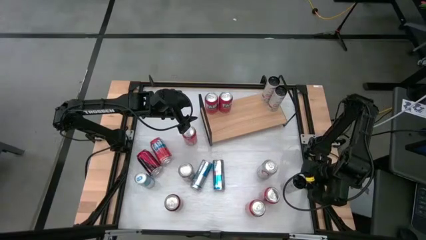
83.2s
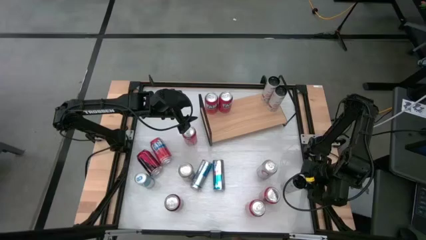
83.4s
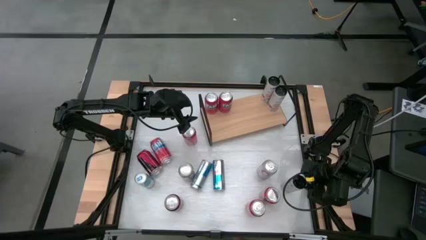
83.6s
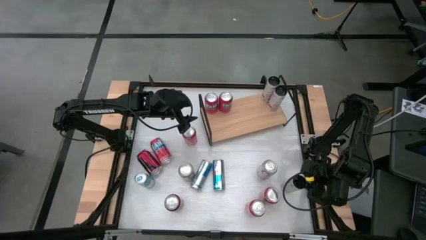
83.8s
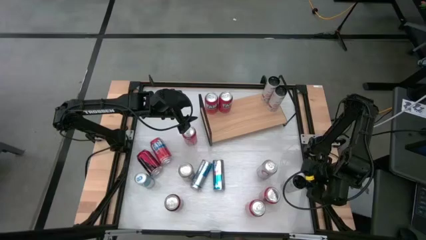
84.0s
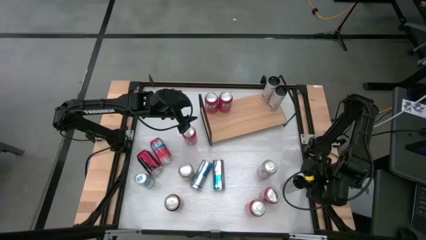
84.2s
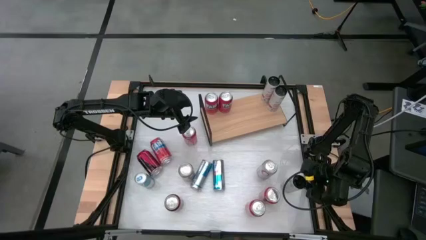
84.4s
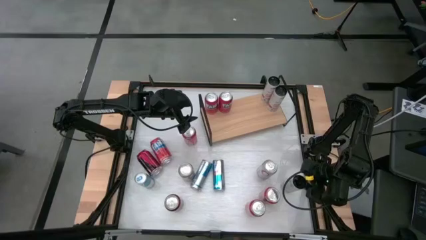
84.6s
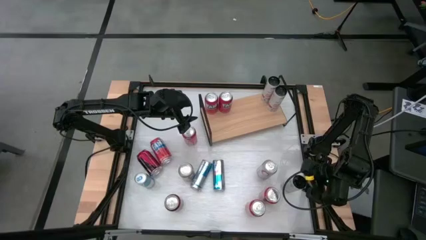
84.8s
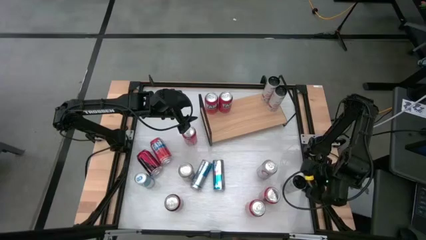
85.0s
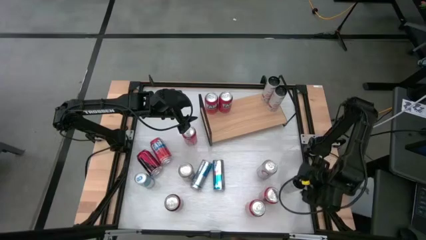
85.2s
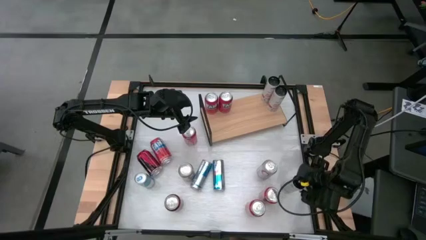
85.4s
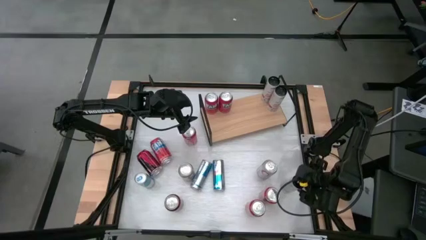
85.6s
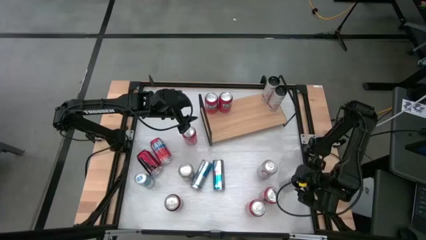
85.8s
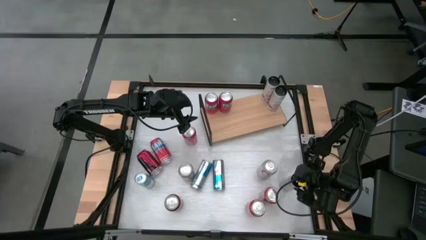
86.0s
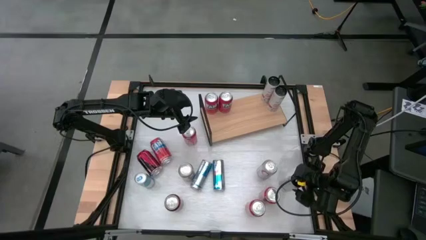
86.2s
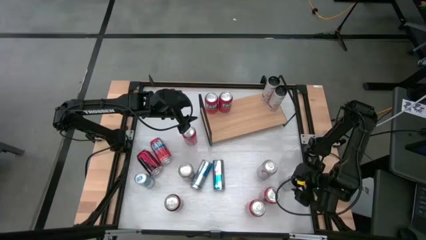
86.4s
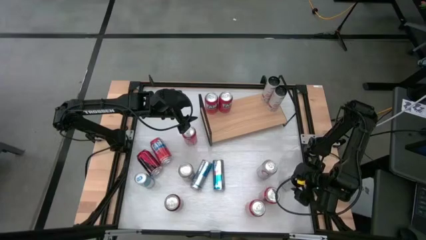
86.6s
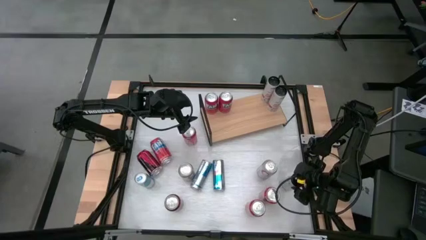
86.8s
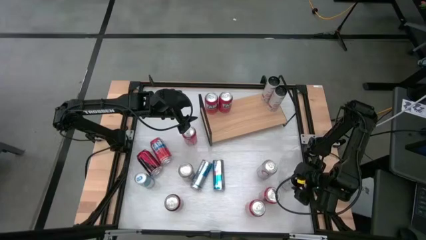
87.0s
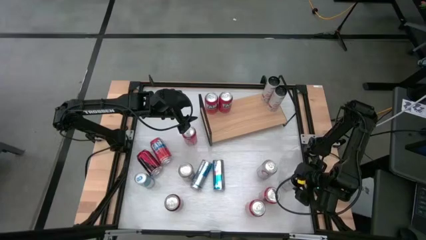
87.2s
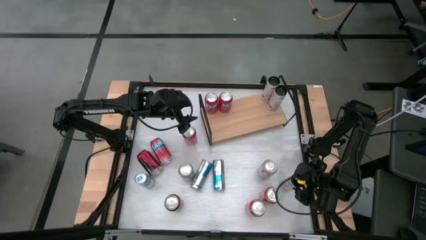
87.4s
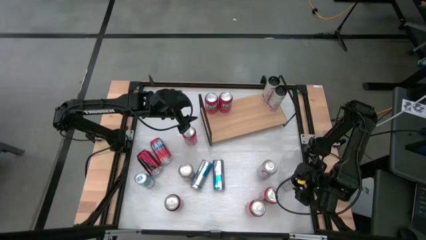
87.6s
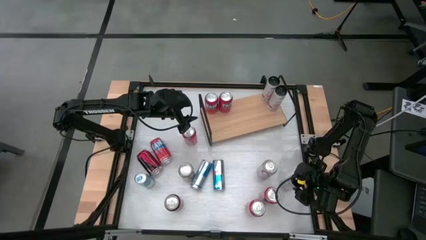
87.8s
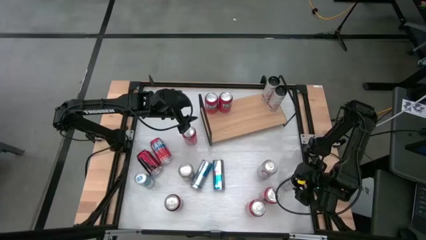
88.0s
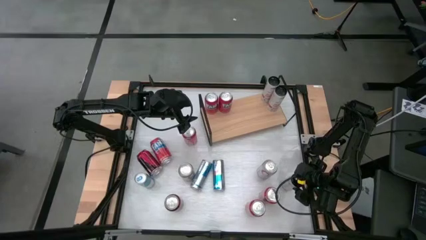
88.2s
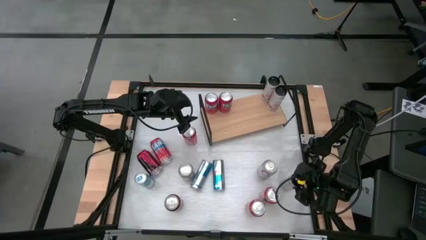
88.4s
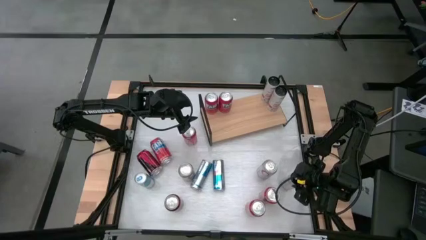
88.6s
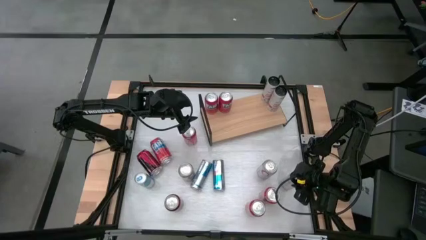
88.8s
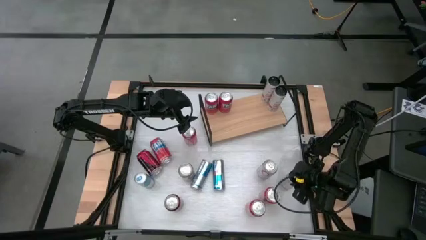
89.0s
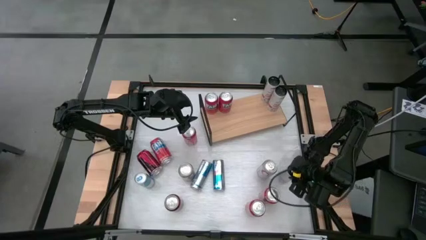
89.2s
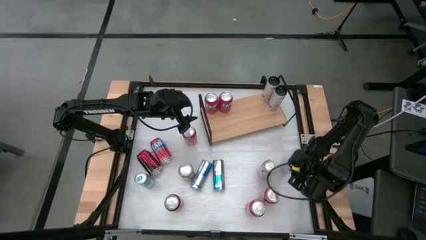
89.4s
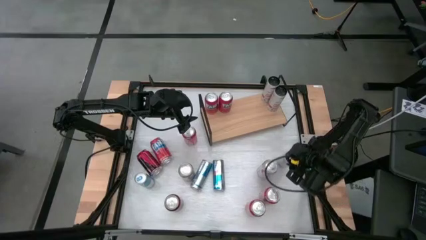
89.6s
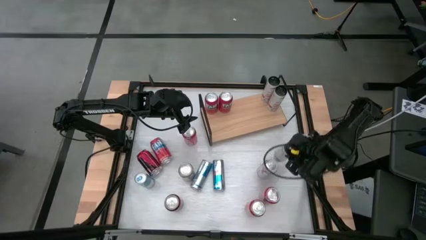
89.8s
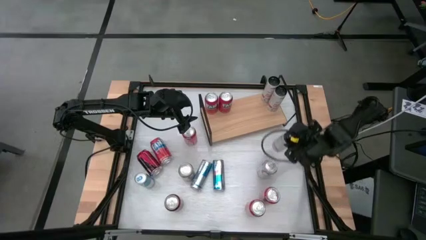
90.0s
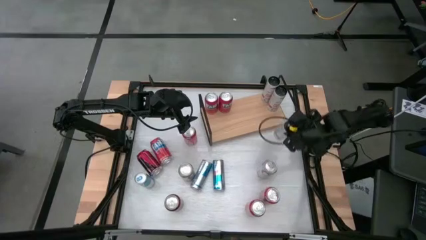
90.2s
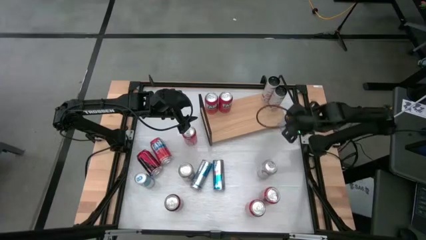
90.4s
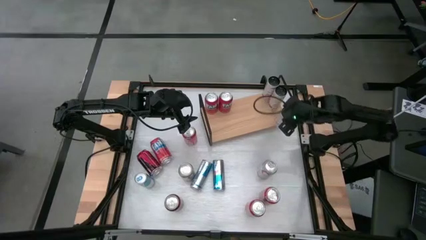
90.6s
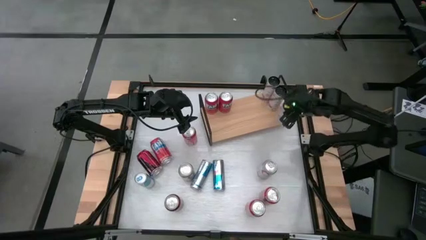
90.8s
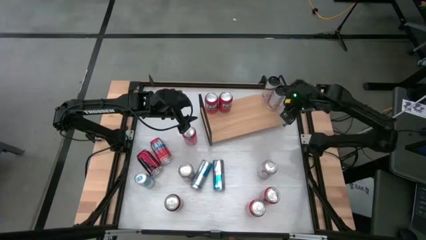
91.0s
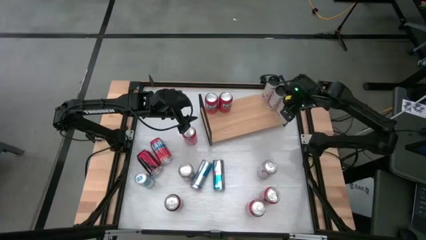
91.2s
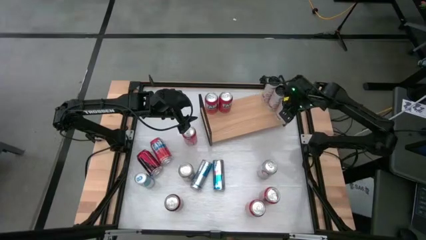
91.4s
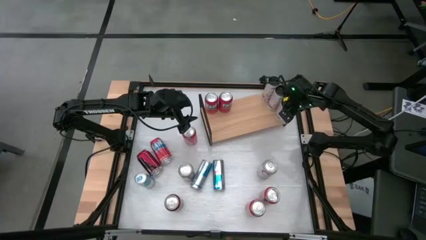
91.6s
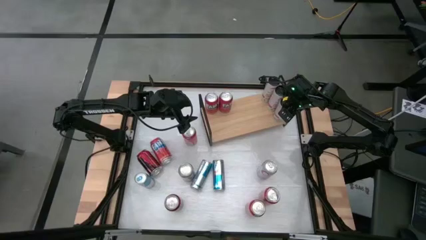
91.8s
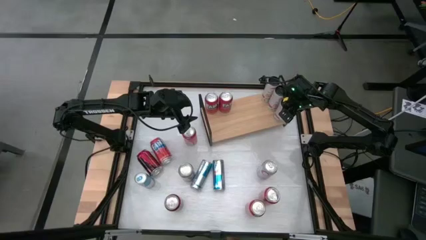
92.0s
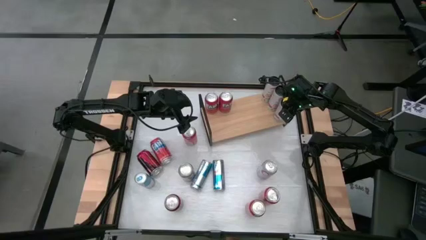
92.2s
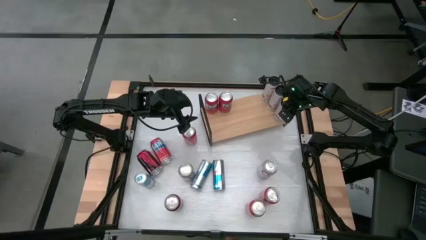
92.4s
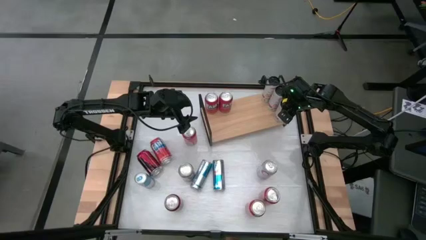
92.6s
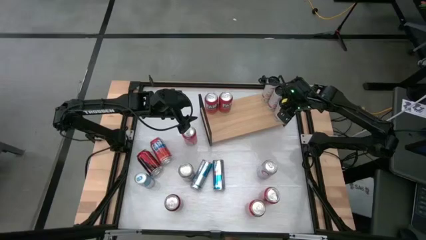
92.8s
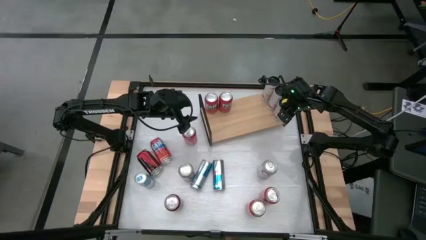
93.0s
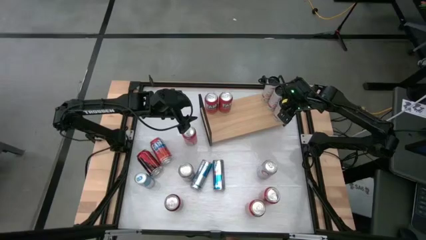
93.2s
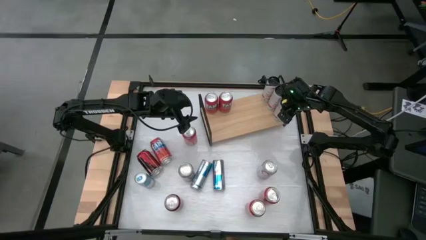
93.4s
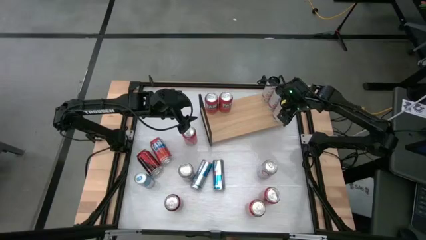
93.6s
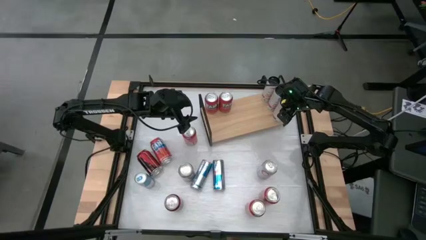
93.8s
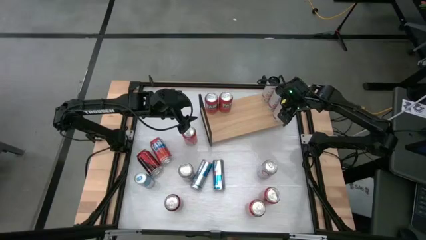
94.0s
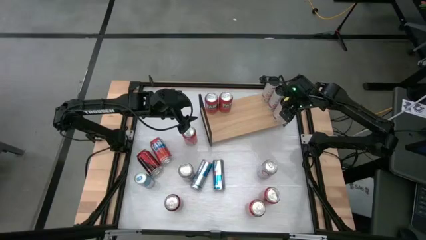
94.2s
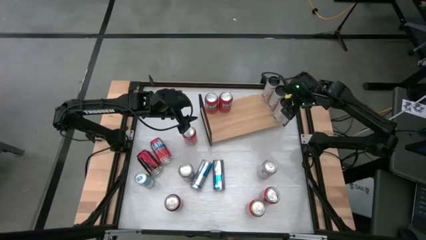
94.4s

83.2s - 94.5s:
Task: Place canned beverage on shelf
Put the black soda can on the shelf

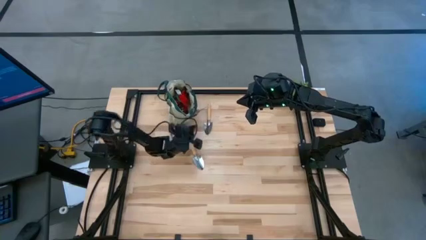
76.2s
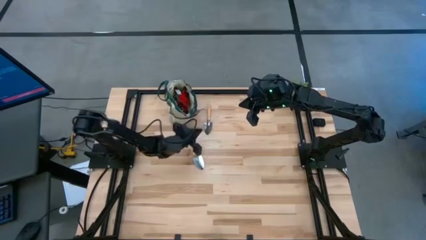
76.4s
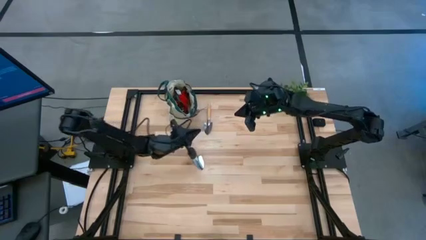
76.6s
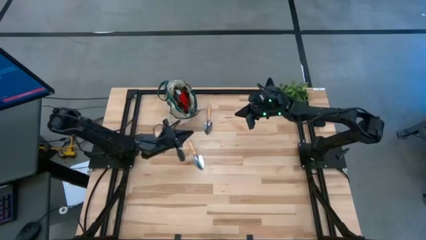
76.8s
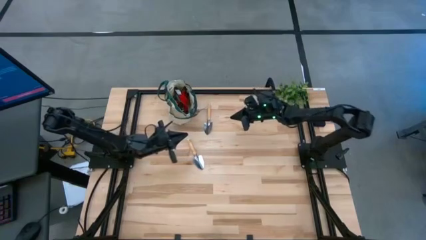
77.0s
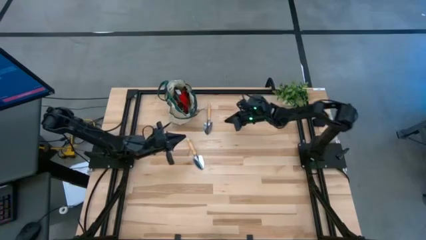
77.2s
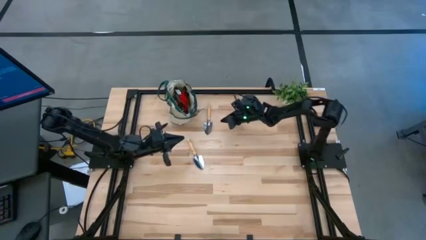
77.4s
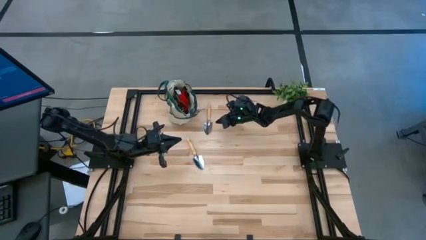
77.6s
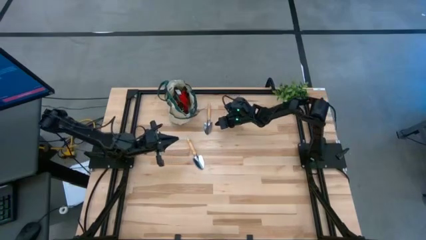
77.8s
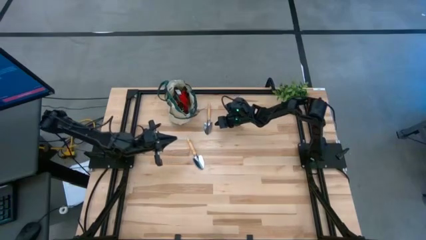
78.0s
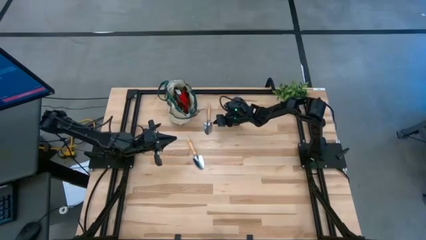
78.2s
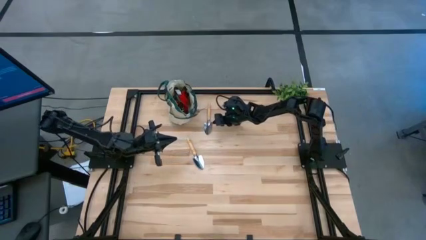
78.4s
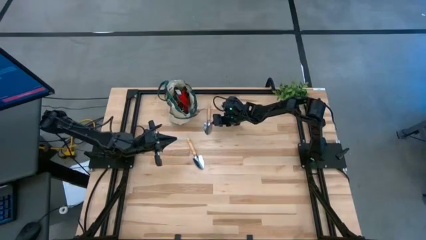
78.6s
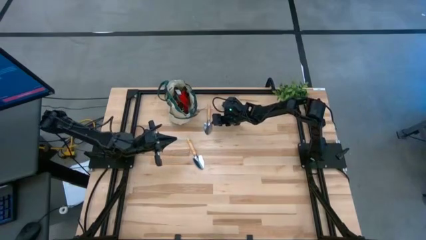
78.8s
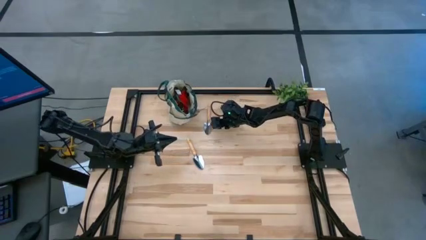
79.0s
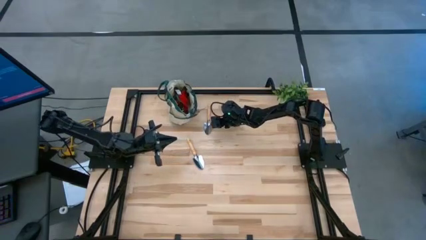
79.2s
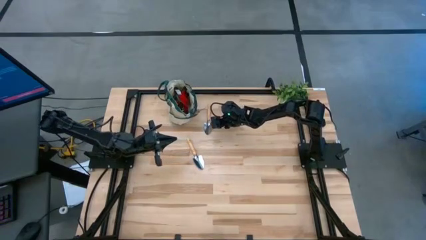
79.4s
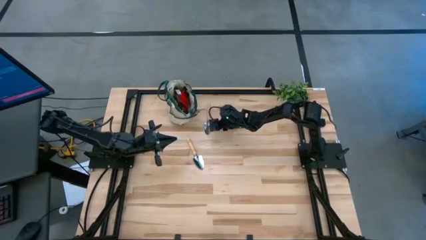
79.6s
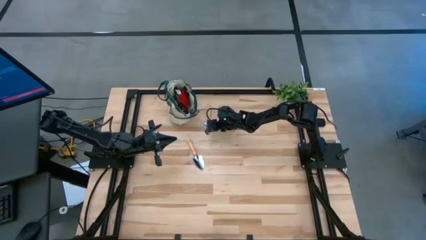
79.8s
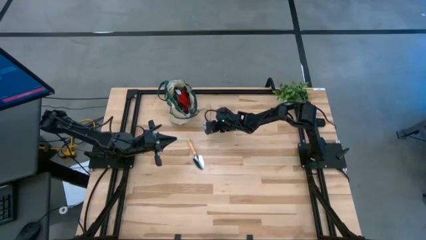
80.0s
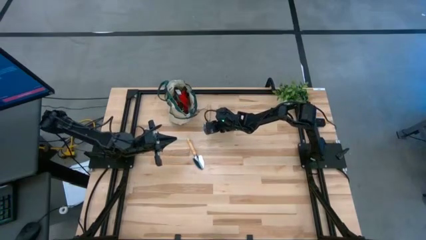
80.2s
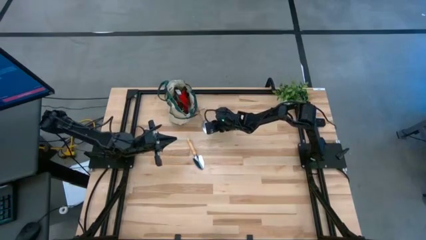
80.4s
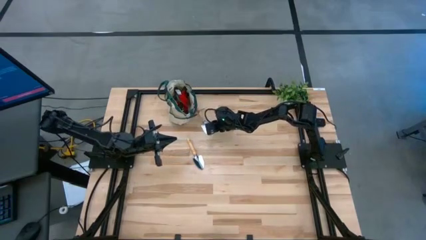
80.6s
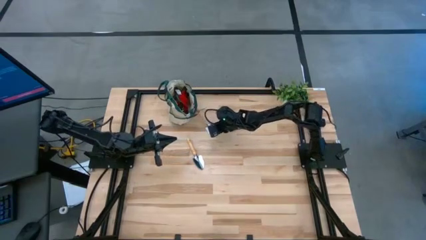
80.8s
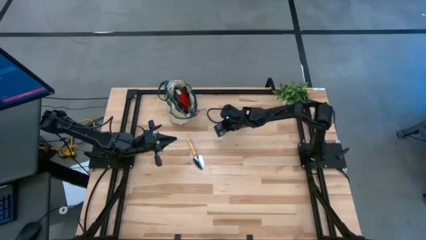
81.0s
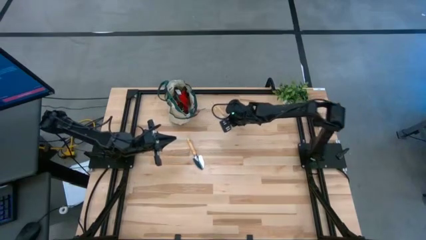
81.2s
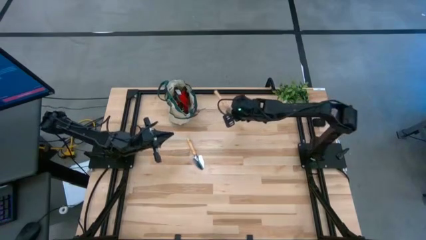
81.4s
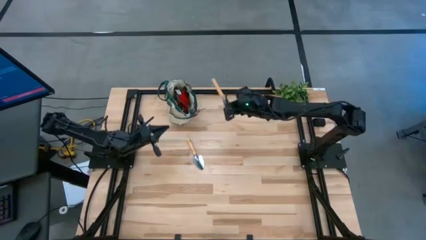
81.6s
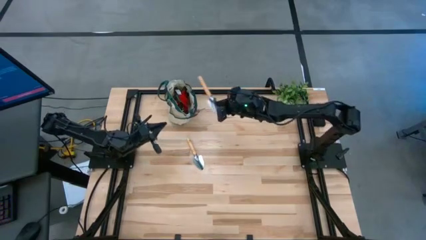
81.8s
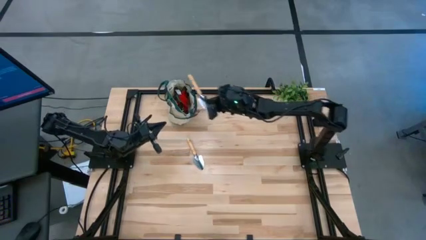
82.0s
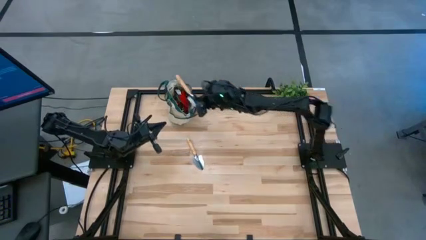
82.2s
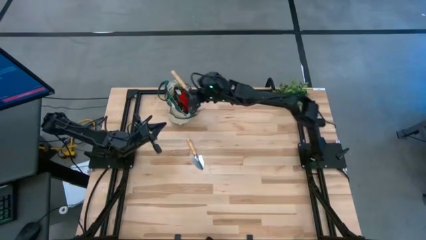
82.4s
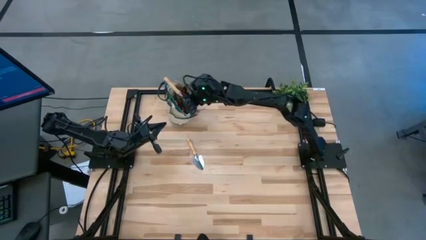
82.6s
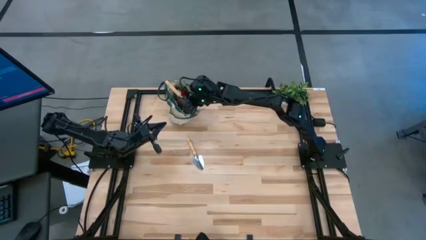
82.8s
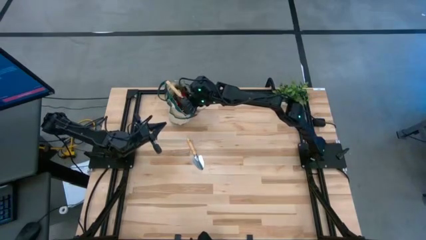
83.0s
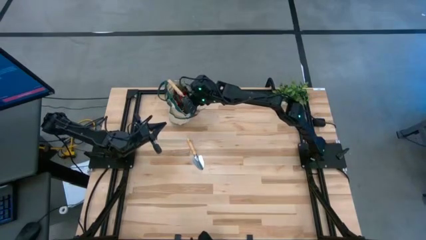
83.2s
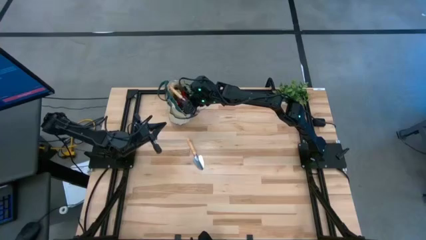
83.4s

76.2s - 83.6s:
Task: Pick & Place Garden tools in Gardening bag
Put the top brown trowel into the yellow gardening bag
